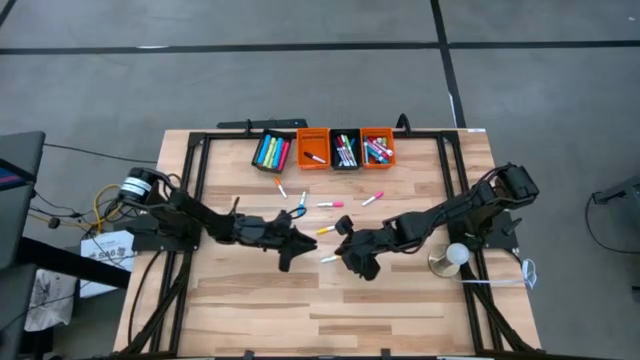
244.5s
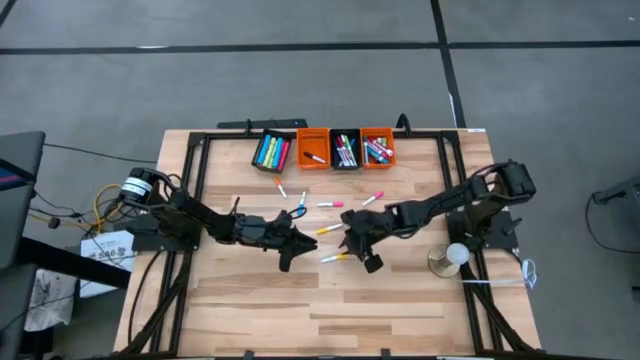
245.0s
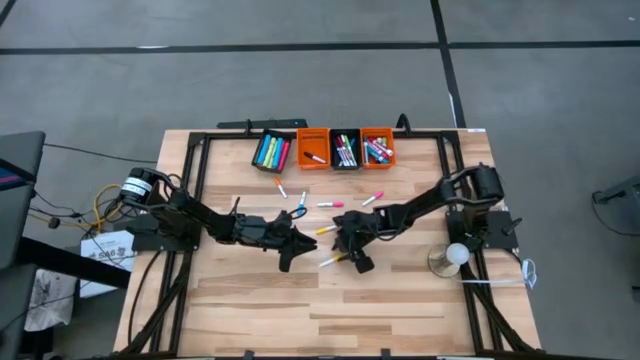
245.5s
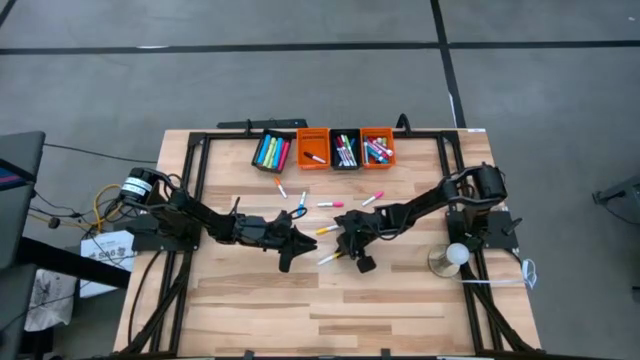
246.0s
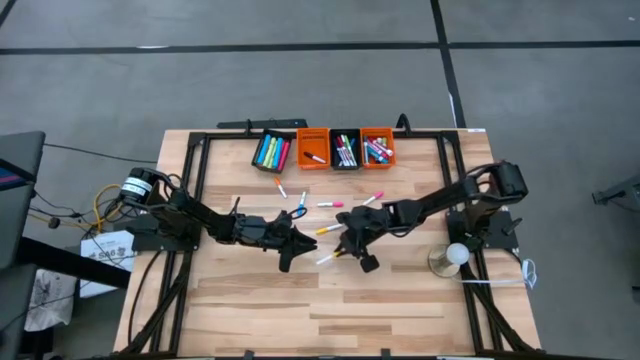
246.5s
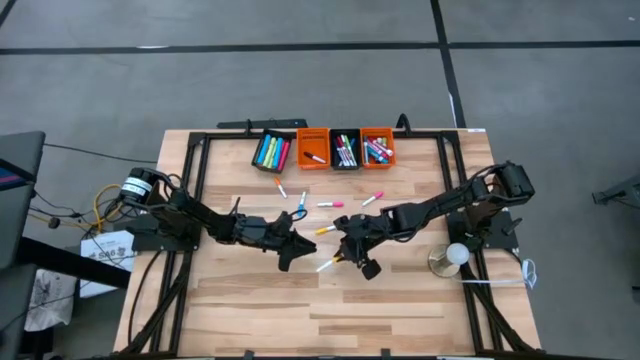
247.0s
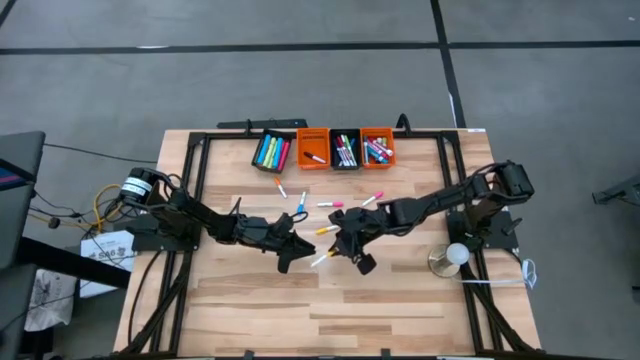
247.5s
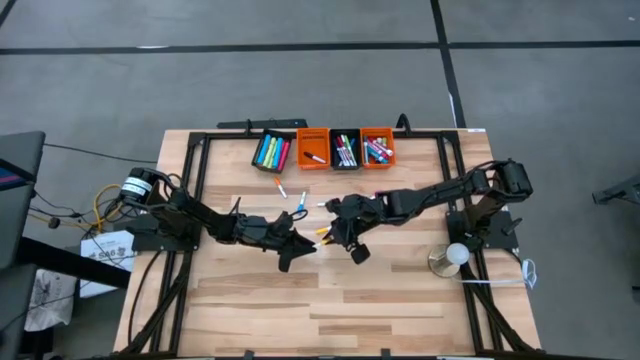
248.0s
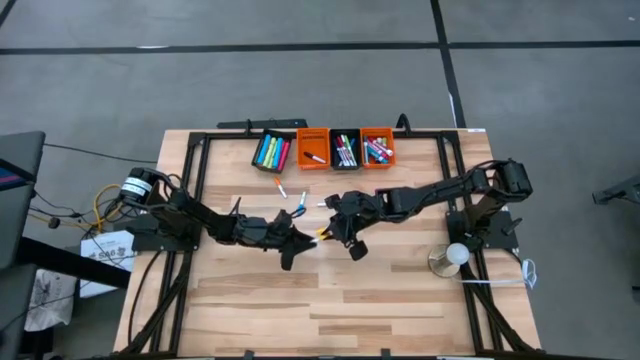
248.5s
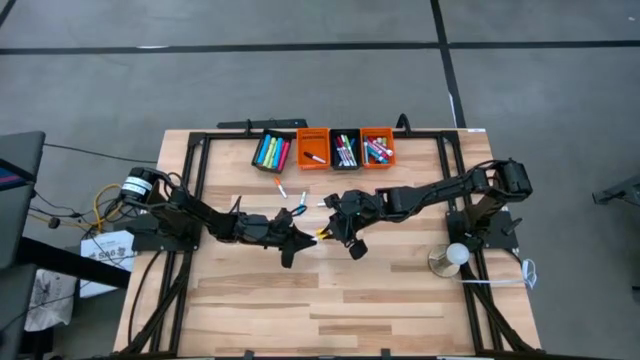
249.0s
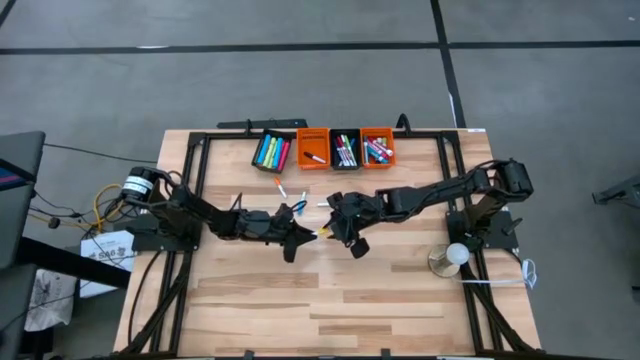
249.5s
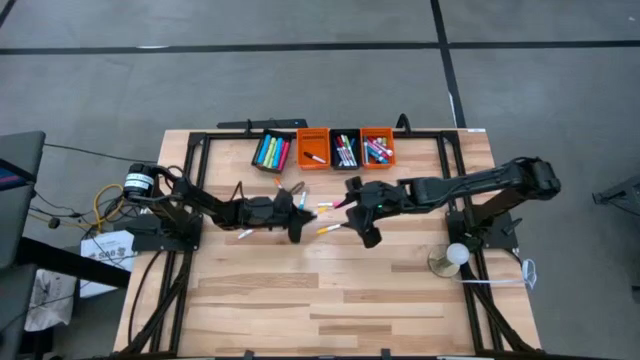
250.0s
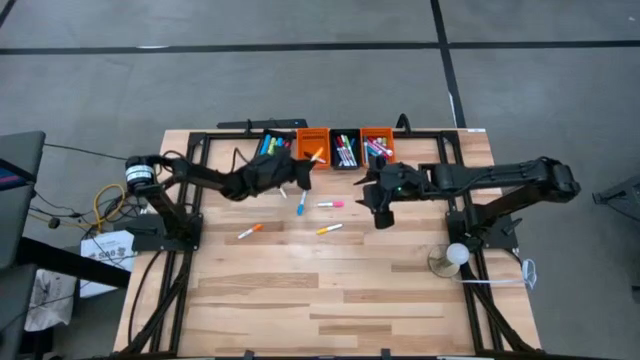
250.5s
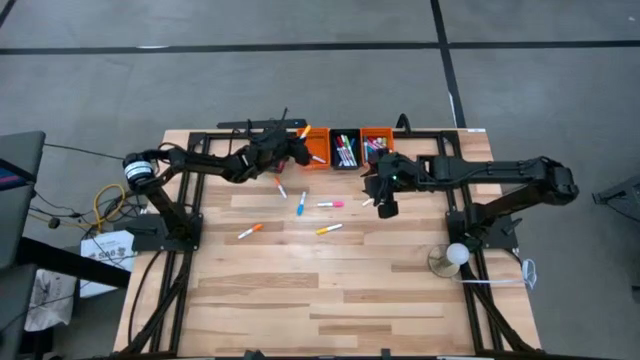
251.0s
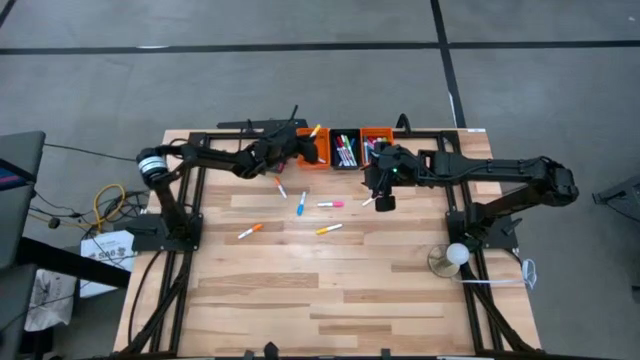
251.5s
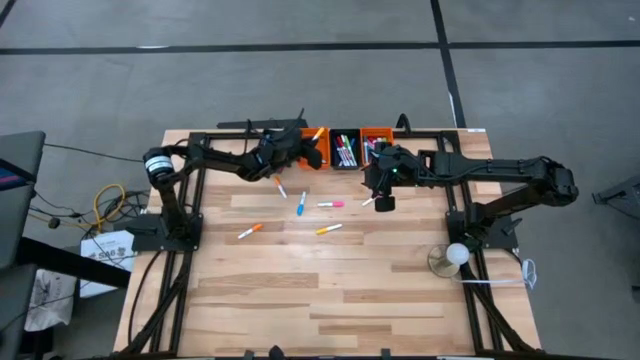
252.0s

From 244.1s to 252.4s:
Task: Pick & Place Markers
Put the bottom small yellow bottom highlighter pen into the left orange basket

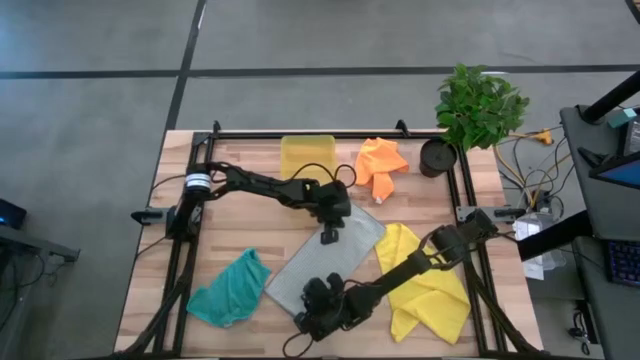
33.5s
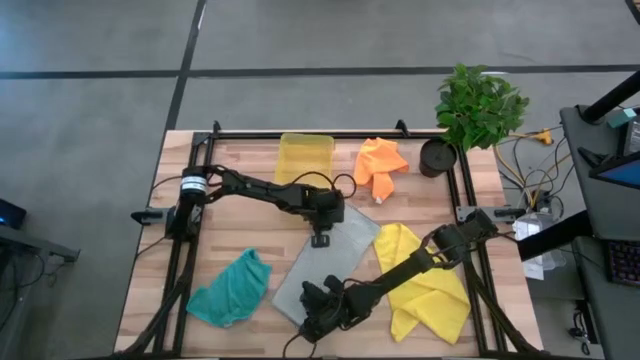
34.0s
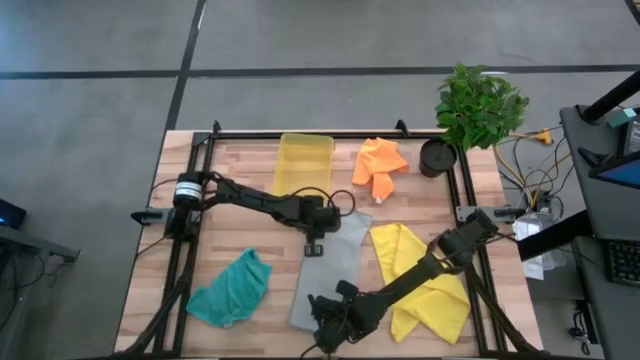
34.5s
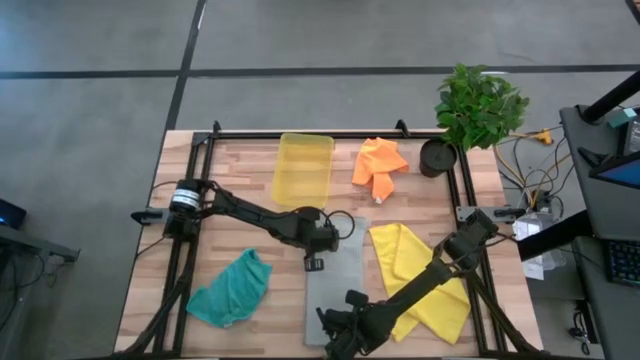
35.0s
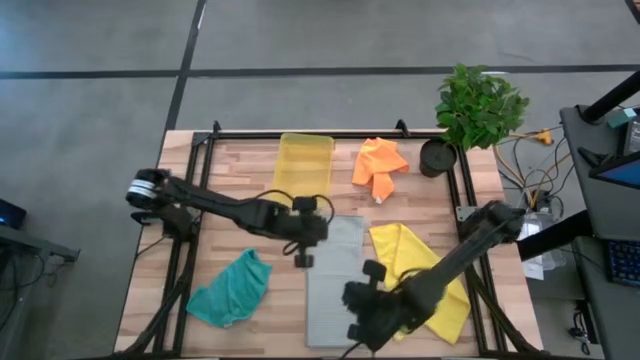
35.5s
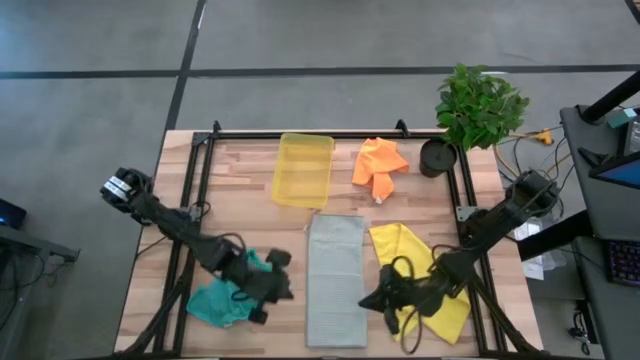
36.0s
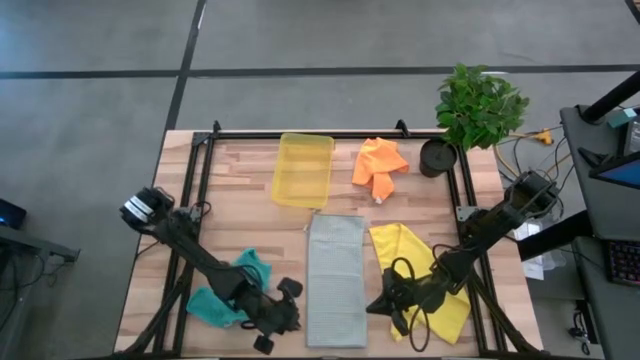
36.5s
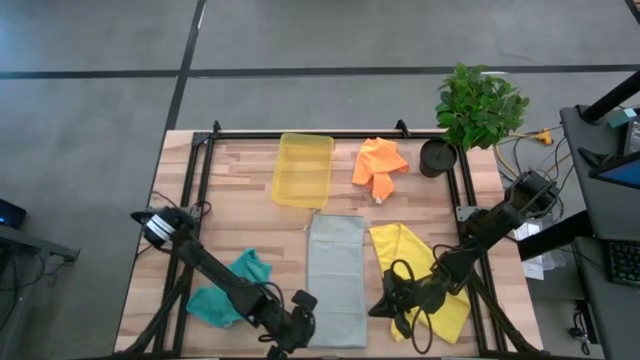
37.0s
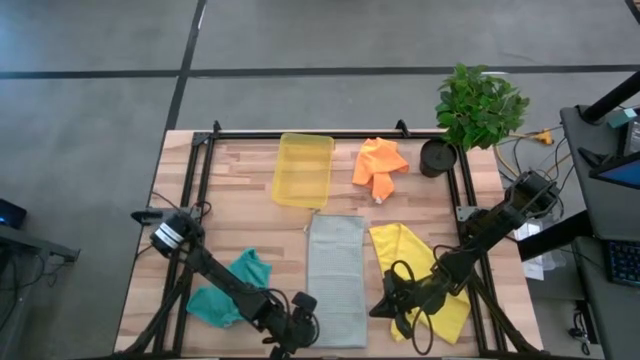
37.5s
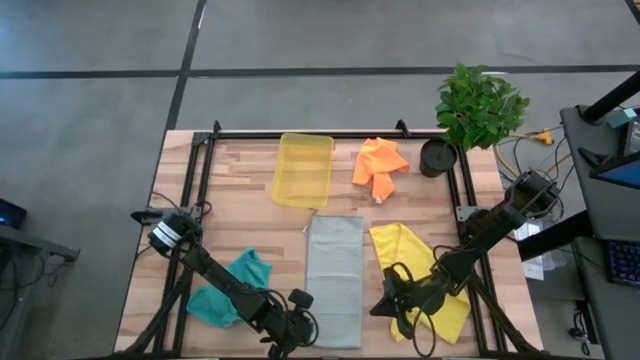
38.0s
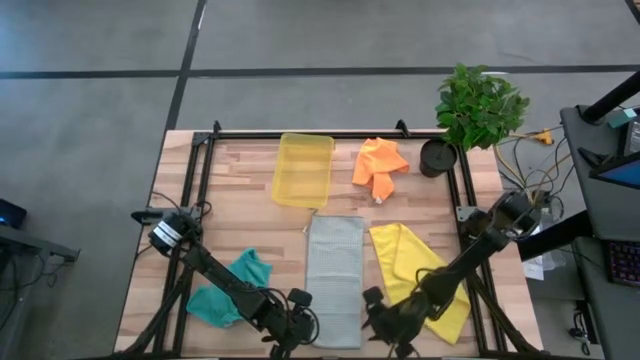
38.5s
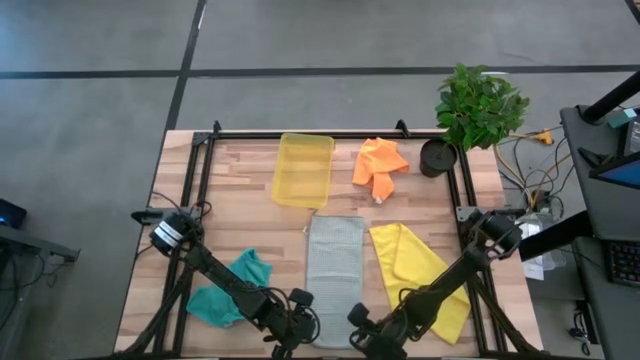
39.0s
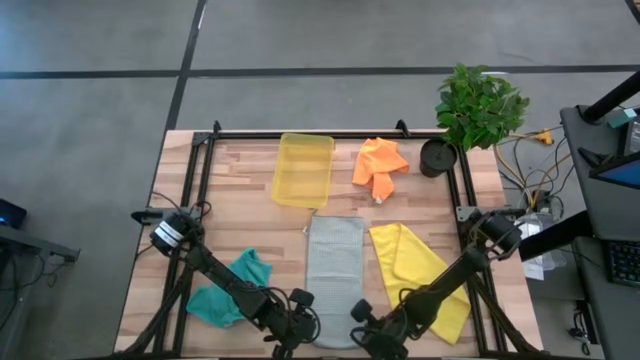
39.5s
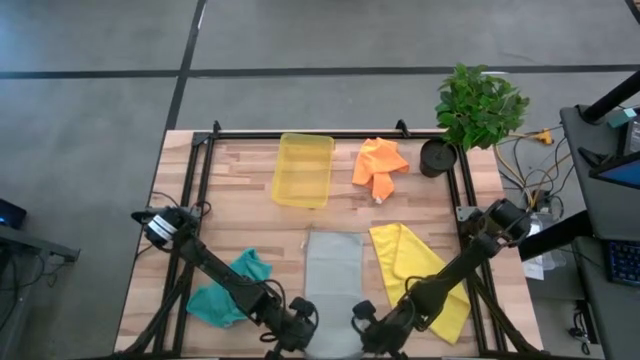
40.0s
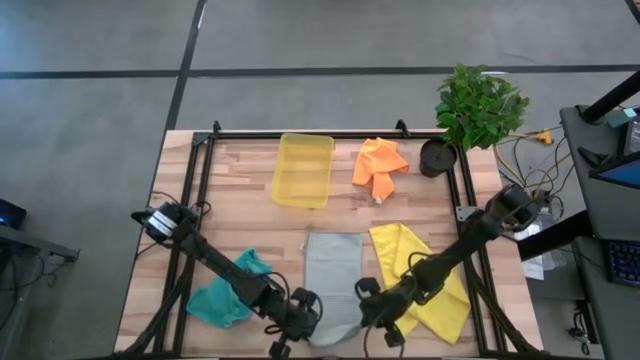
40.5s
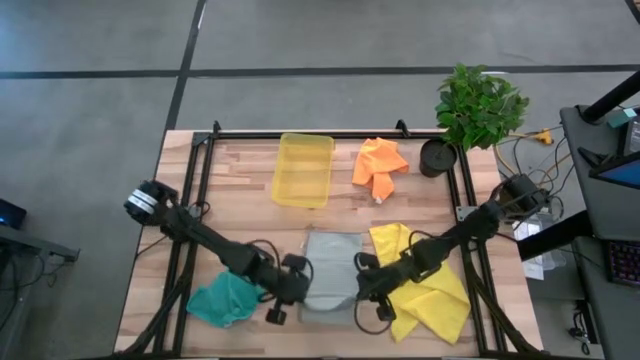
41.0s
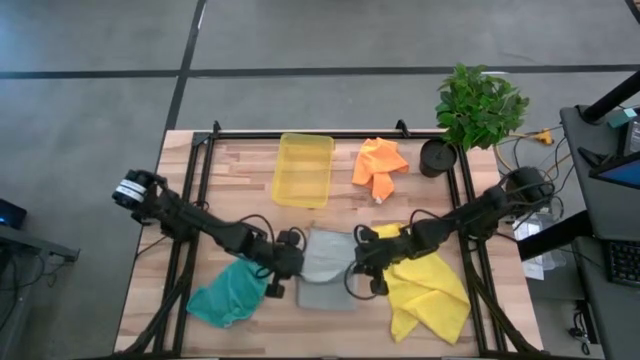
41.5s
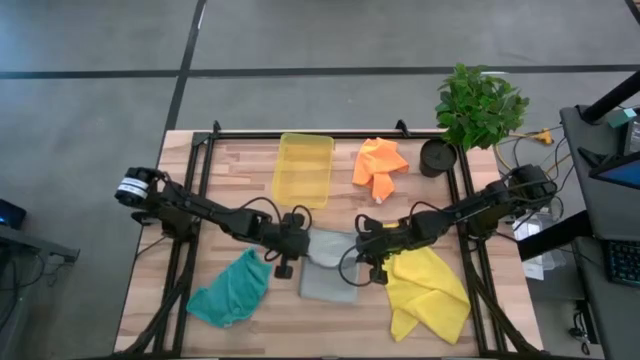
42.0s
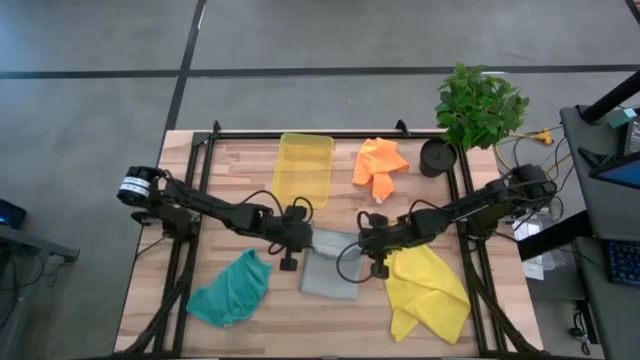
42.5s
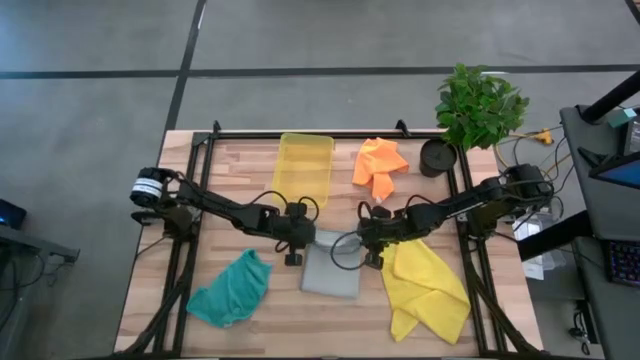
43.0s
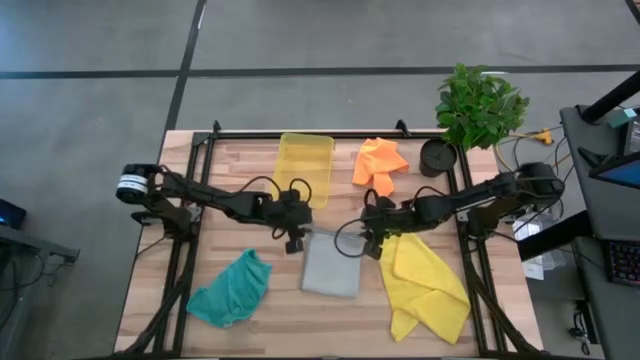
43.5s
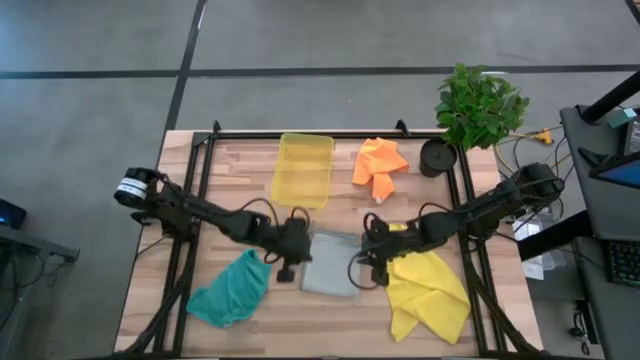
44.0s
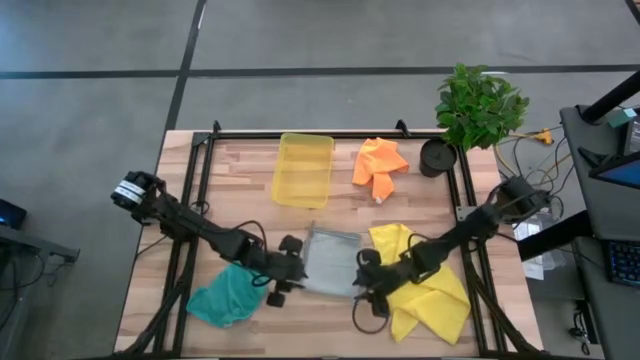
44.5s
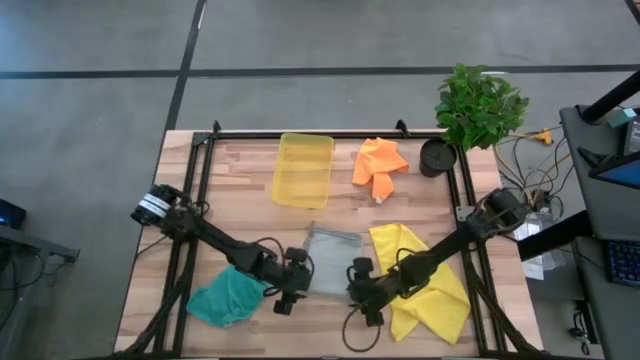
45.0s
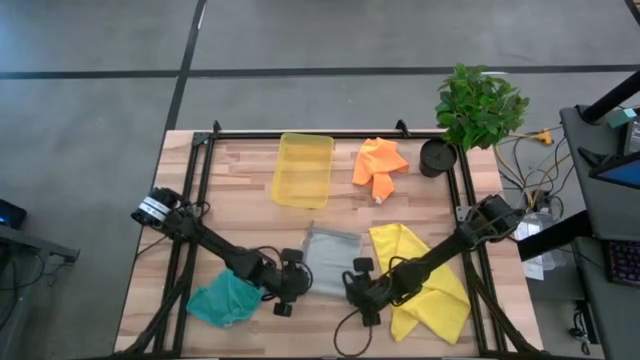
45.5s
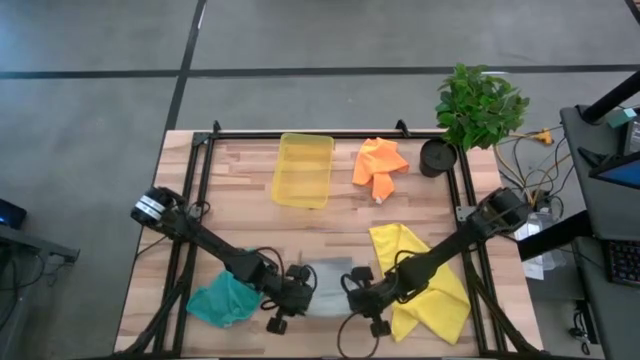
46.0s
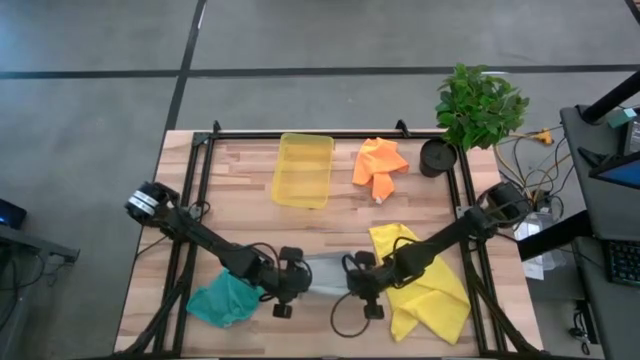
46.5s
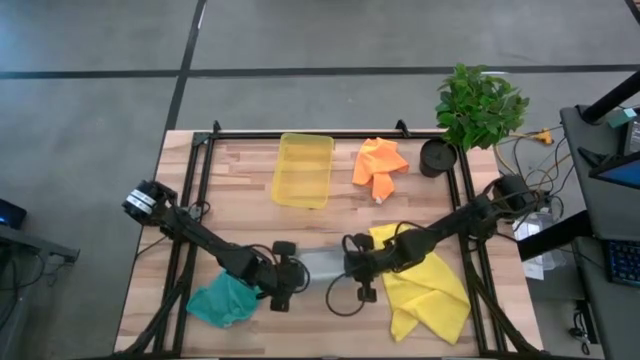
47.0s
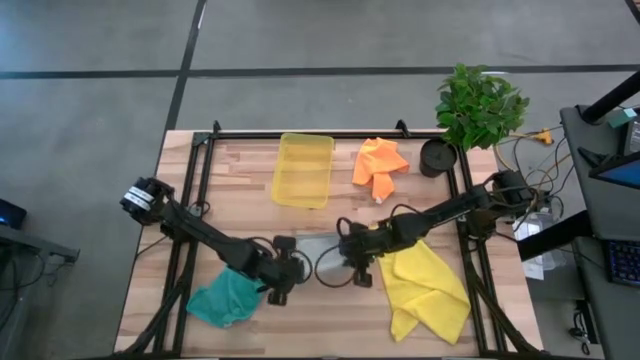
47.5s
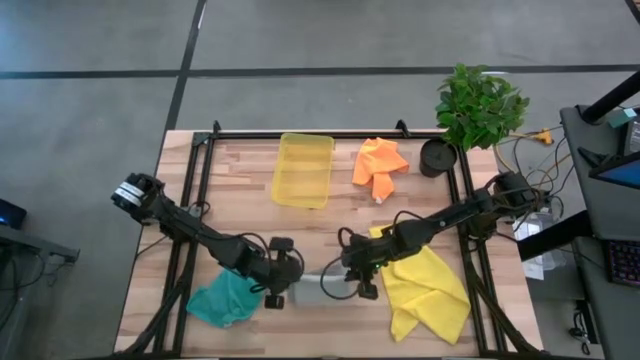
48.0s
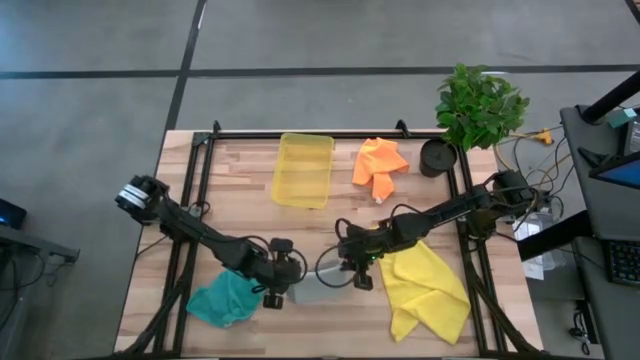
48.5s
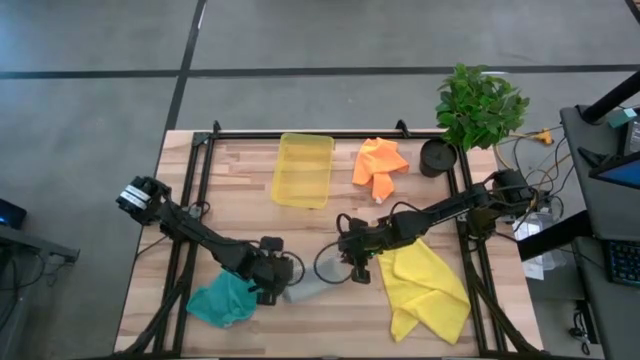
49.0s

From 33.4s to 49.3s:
Task: Fold microfiber towels
Fold the gray microfiber cloth
